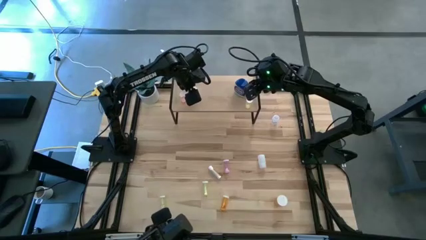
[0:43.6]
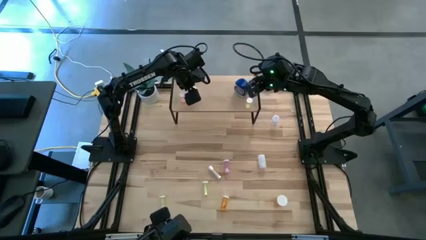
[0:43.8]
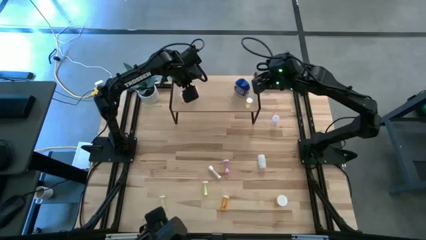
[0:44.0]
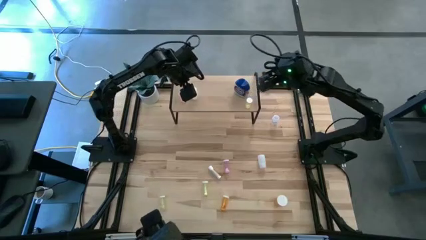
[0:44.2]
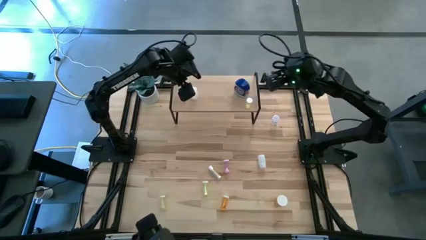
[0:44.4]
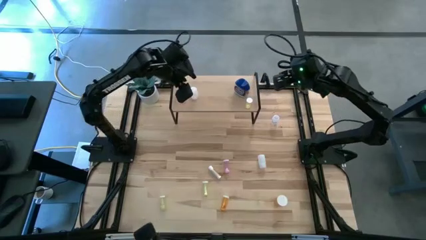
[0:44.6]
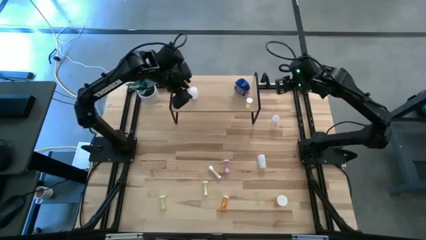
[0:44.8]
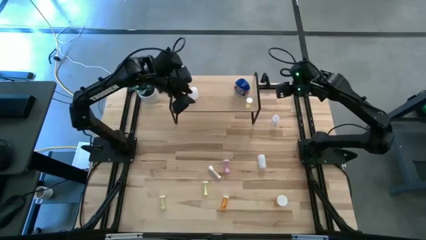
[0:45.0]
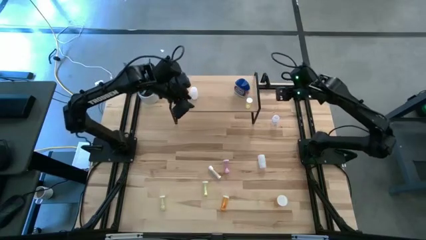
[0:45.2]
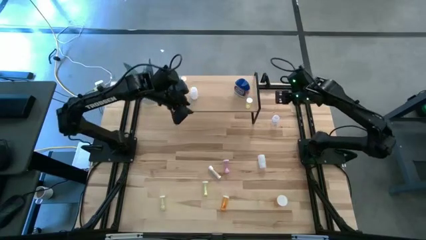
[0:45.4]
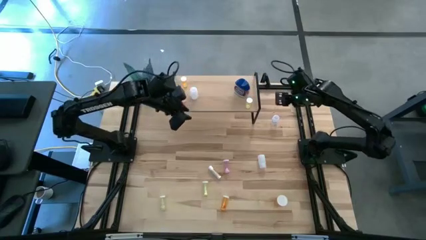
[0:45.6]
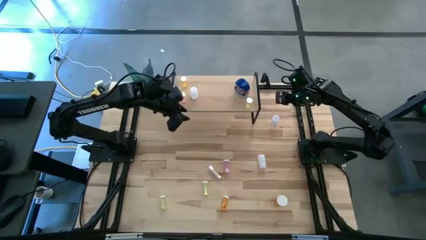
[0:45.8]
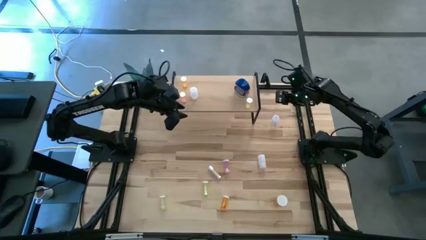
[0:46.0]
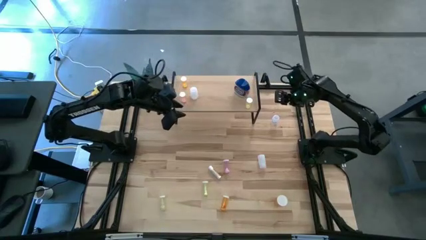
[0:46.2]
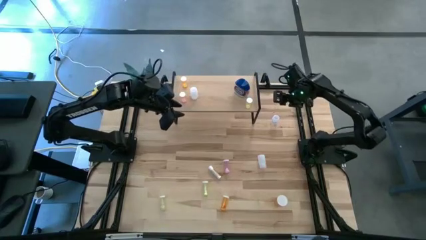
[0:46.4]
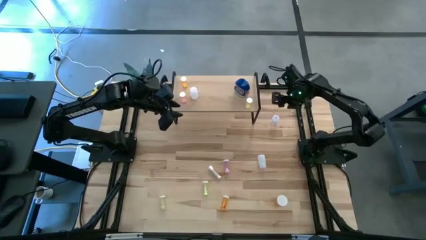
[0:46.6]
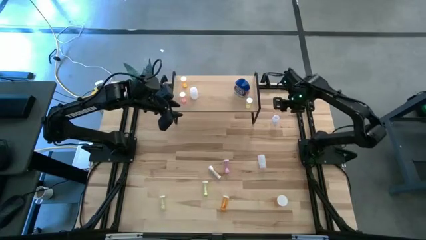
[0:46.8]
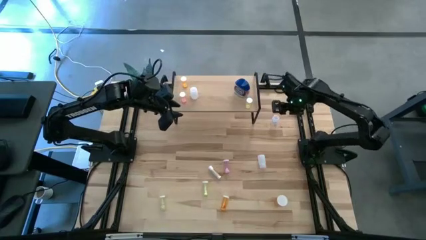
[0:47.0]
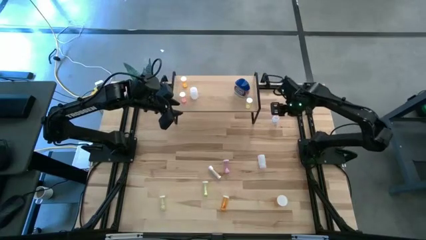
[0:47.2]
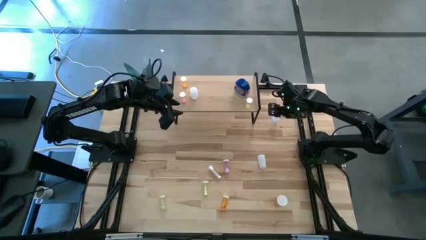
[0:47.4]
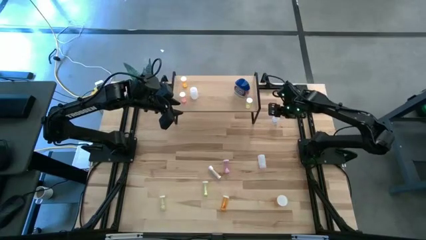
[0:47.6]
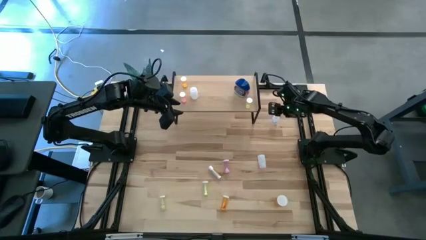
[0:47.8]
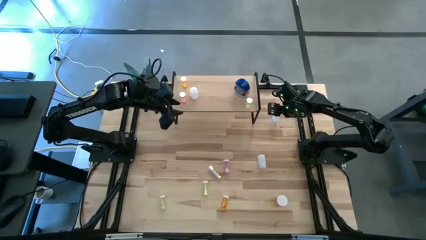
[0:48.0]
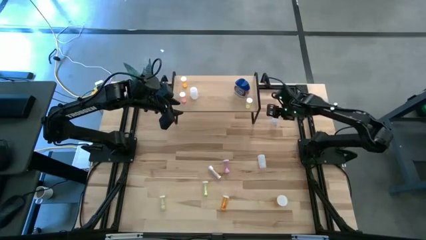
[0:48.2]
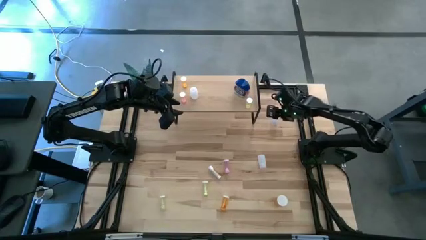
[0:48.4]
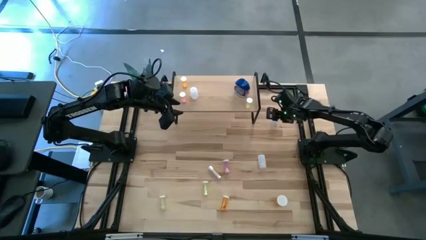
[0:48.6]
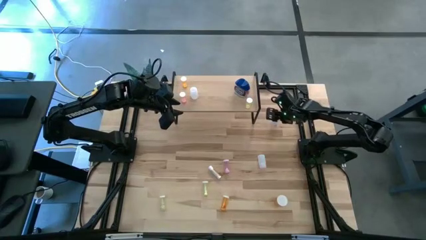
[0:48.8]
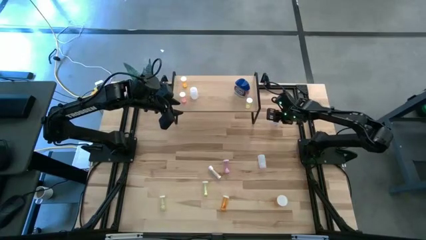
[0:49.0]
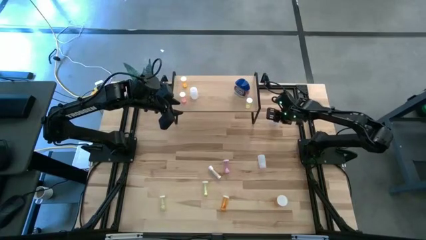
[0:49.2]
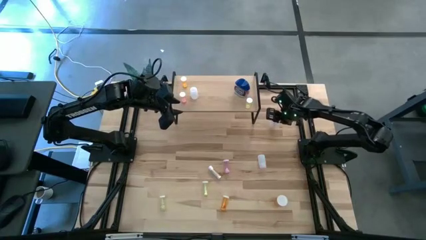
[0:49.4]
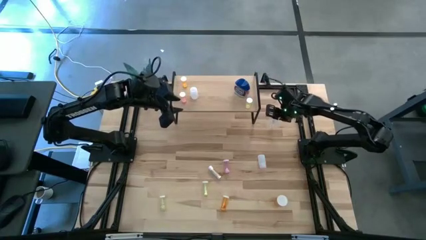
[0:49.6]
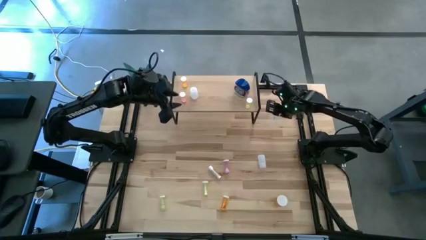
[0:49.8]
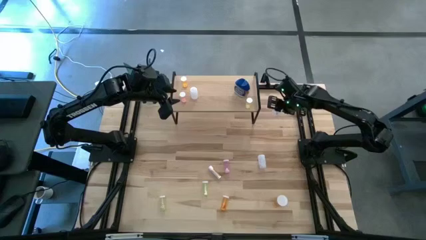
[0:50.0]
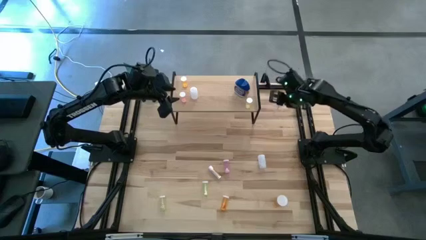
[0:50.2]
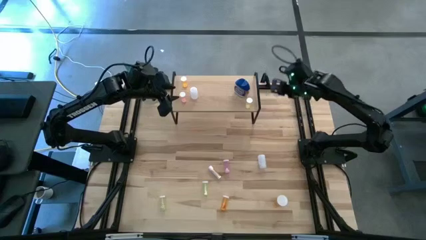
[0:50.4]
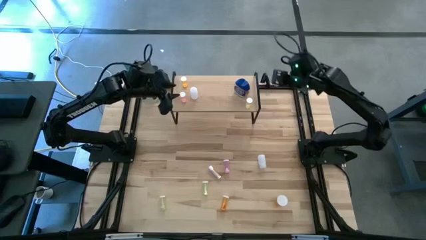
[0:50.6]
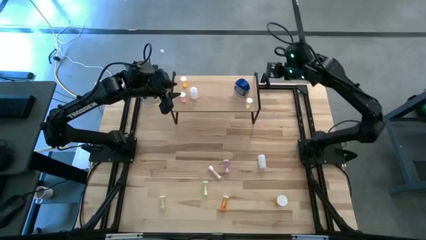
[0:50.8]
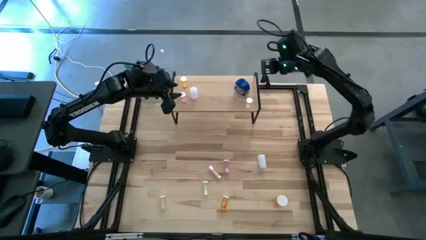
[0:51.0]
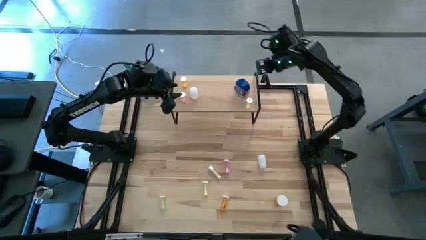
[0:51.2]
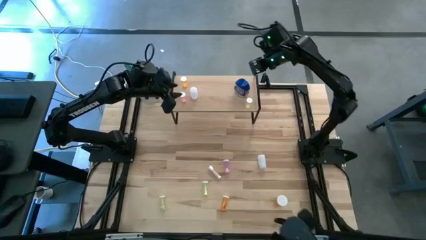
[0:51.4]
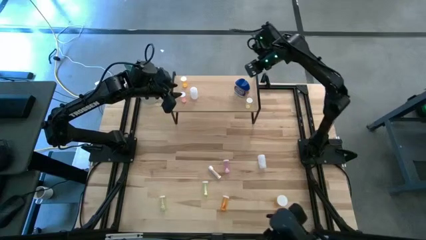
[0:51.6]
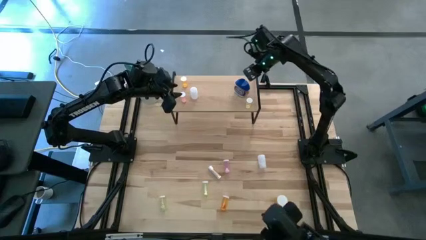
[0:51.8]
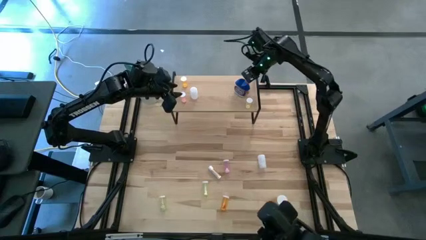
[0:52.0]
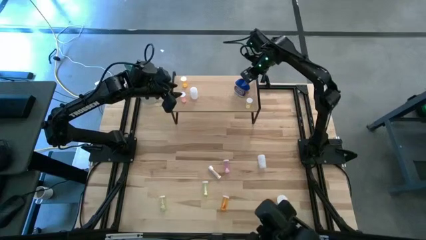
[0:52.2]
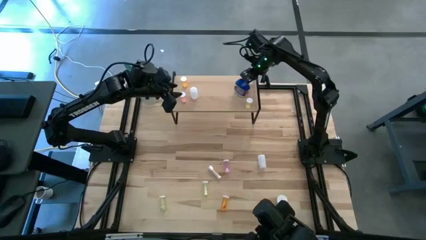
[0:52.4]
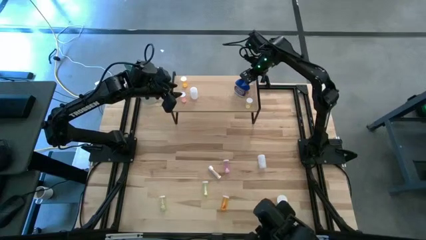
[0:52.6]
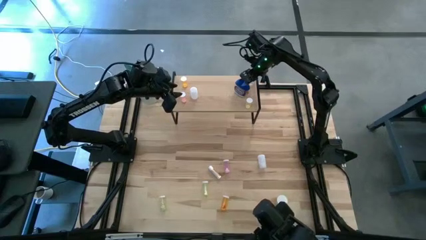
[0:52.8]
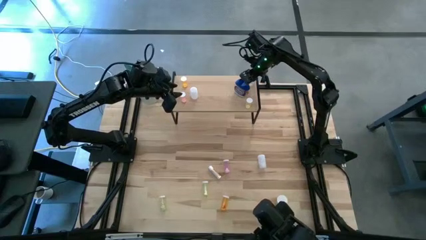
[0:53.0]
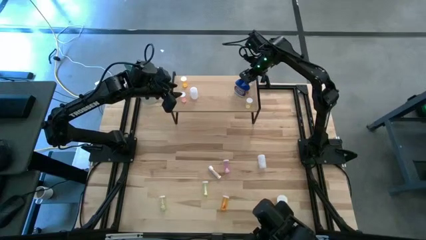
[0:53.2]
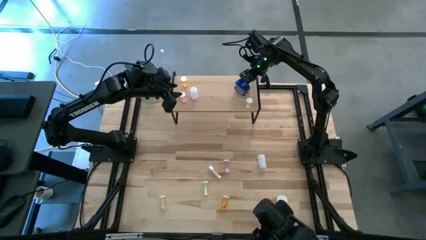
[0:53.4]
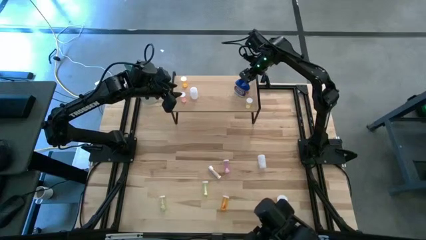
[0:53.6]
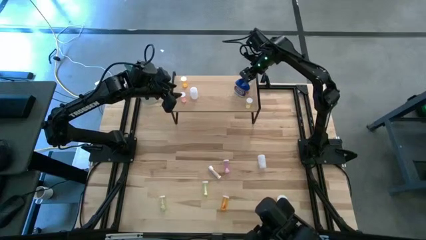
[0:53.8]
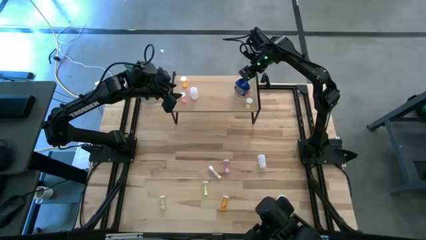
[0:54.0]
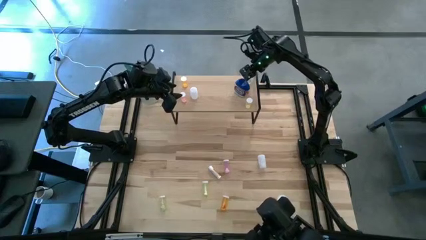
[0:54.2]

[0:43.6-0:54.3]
Task: Pick and place medicine bottles onto shelf by color
Put the transparent pill bottle on the shelf

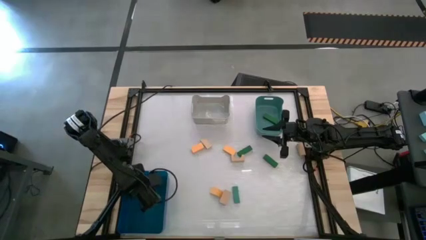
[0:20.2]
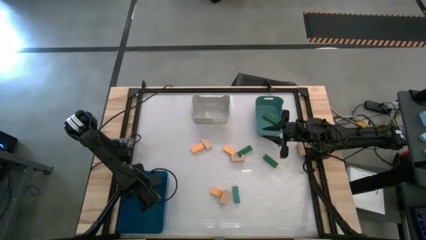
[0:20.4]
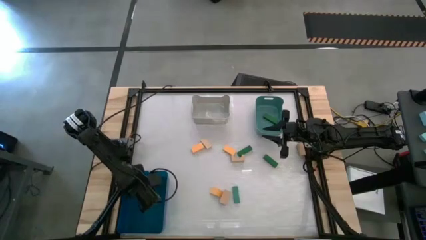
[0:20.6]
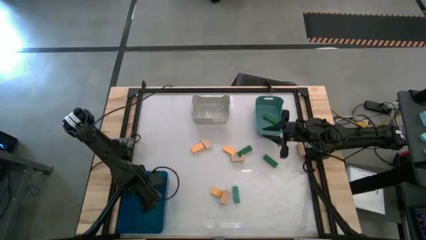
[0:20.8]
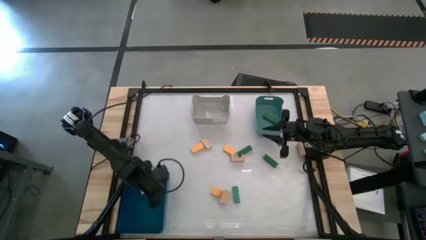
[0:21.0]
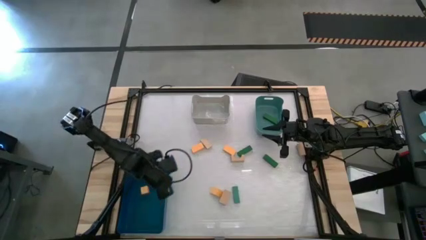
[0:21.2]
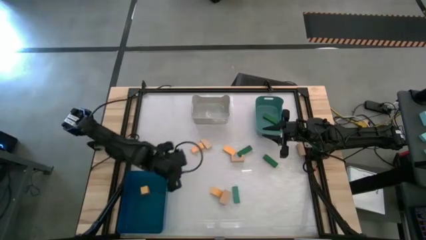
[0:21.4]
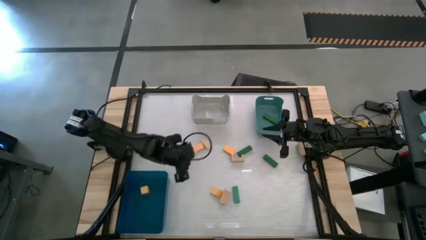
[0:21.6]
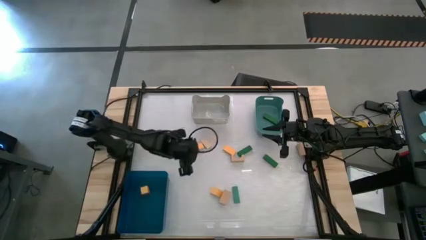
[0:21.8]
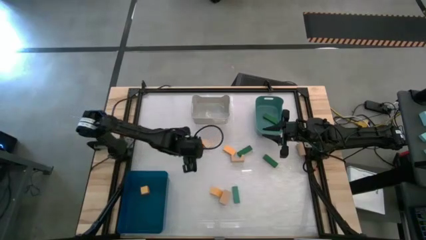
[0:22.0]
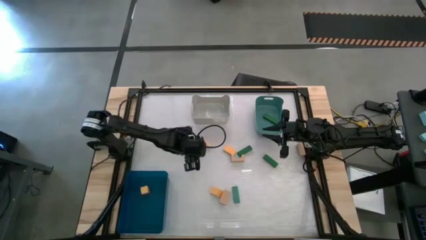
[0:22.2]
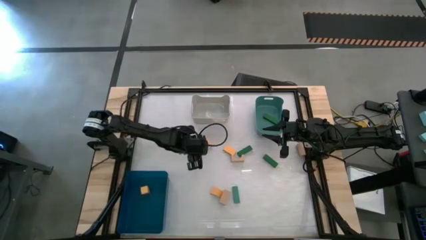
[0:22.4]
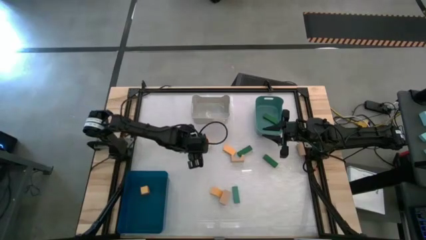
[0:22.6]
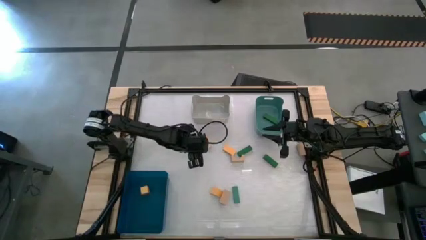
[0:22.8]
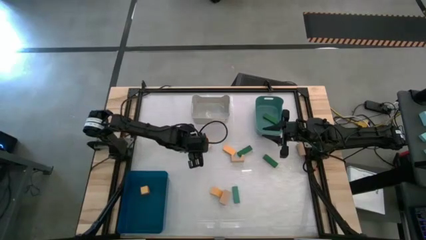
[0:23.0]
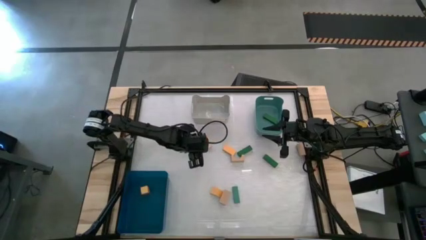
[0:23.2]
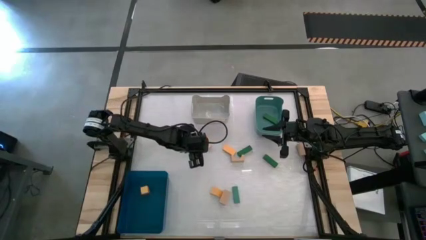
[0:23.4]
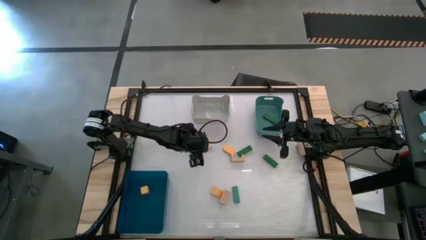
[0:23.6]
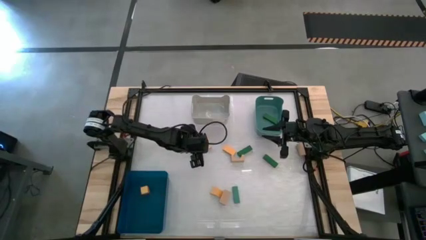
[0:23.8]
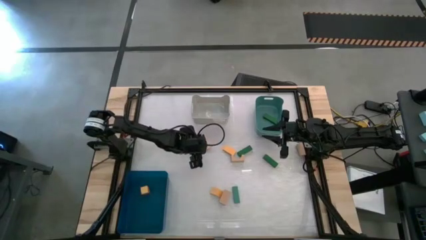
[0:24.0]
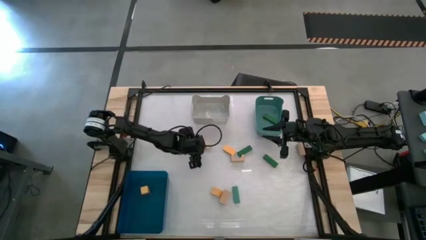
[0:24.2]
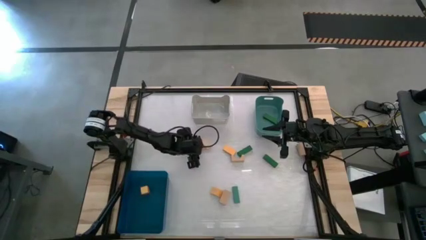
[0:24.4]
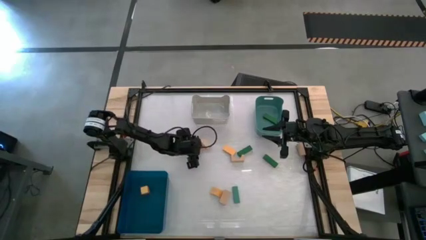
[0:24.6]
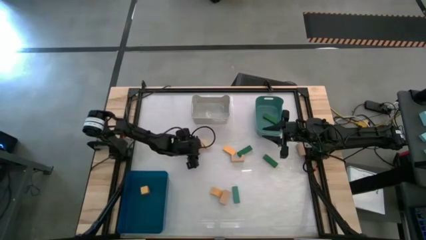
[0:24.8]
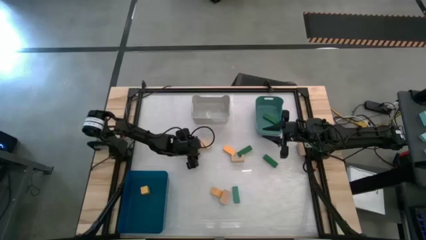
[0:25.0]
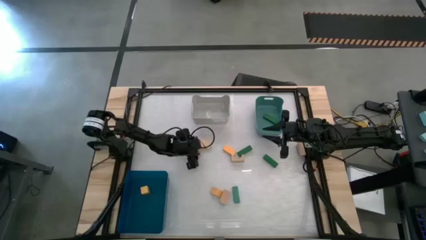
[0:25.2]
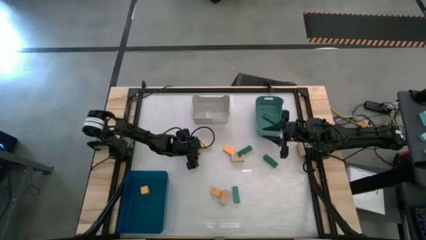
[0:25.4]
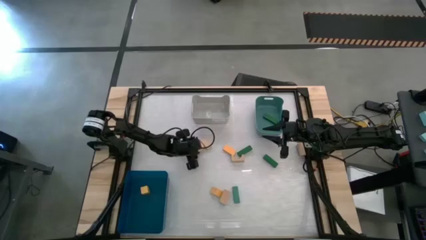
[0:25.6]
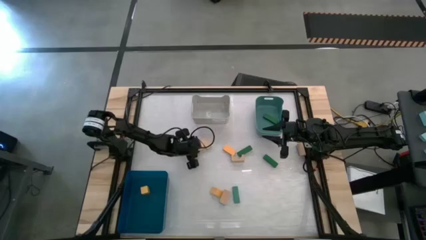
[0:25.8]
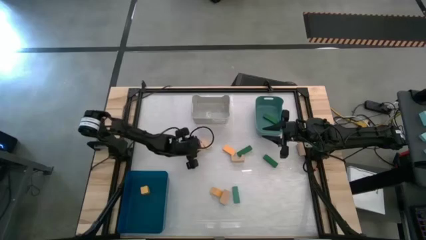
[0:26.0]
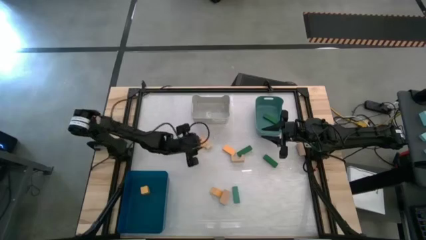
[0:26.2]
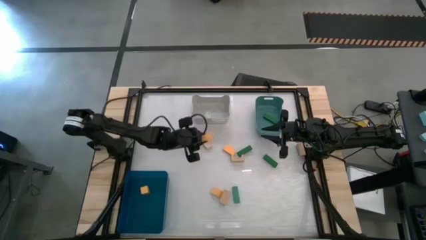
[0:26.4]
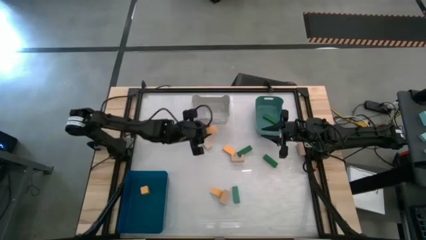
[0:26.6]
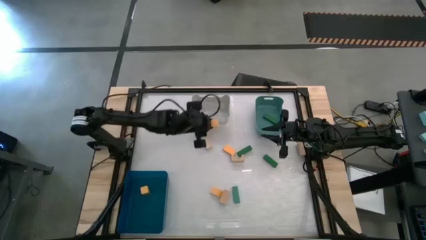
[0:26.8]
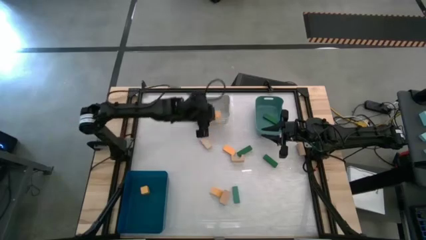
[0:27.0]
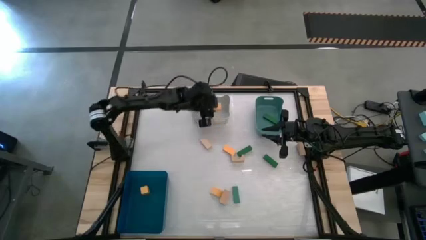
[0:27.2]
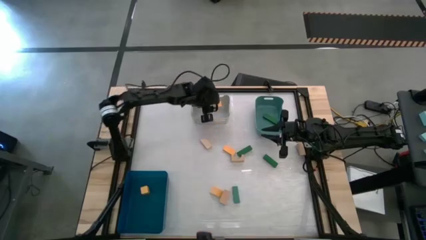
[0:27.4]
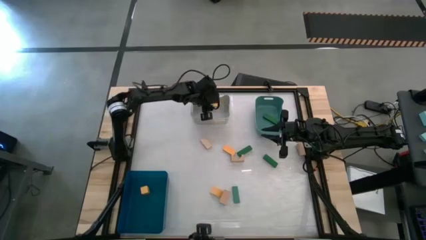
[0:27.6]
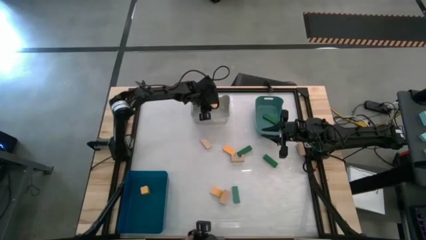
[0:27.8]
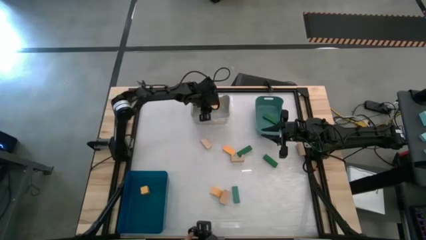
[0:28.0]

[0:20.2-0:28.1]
Task: Sort & place blocks by color
Put the yellow block into the blue bin
